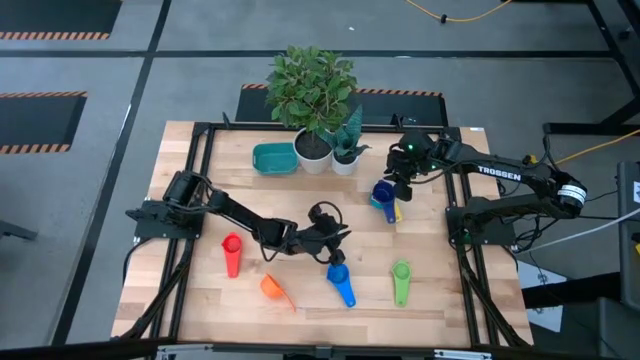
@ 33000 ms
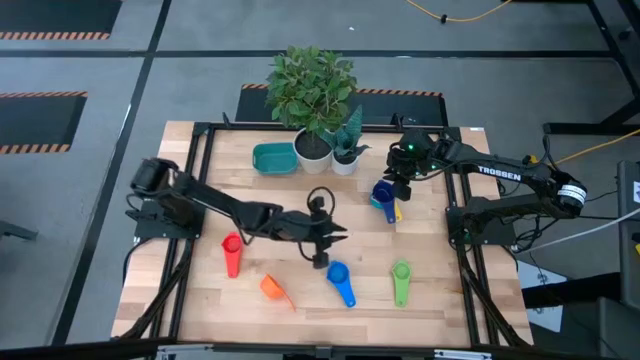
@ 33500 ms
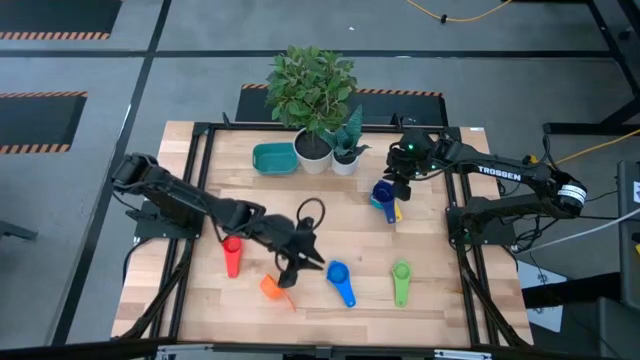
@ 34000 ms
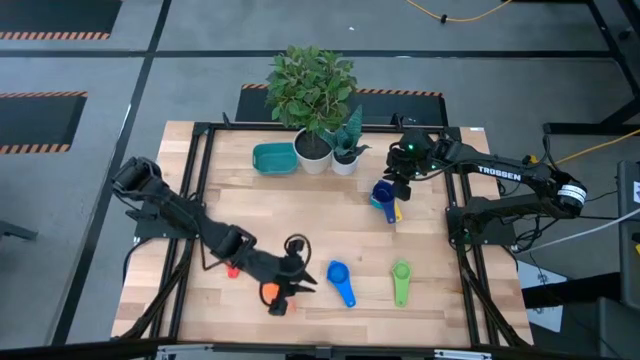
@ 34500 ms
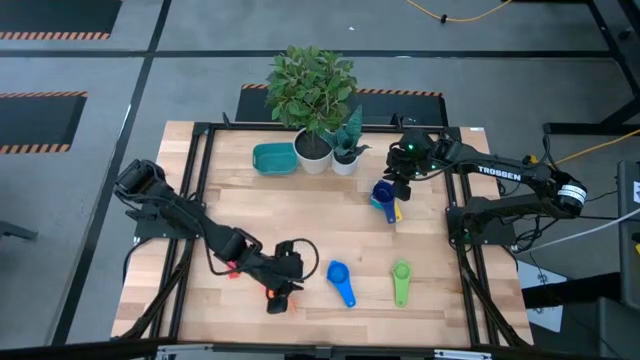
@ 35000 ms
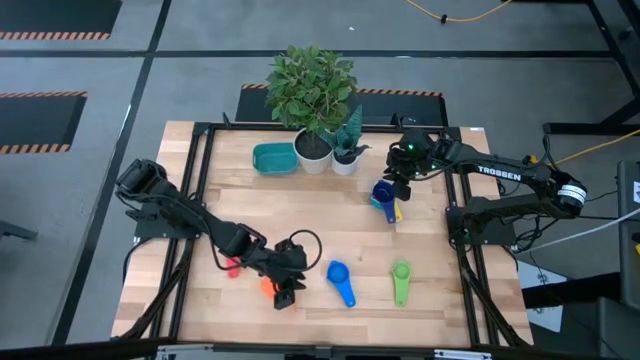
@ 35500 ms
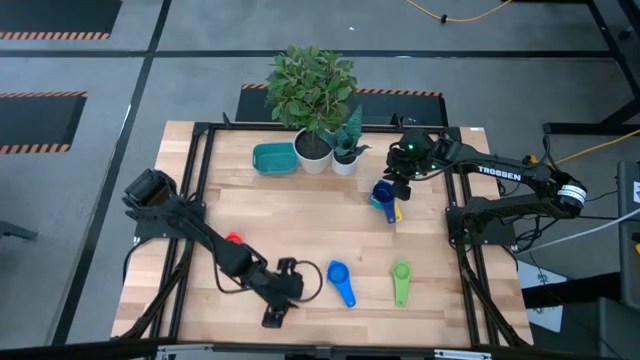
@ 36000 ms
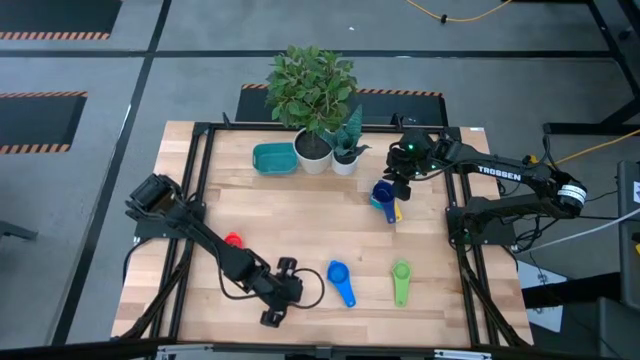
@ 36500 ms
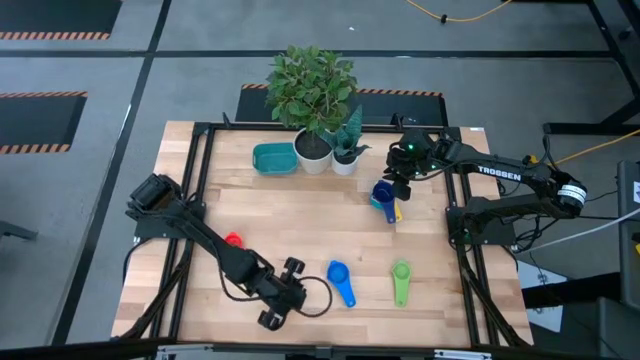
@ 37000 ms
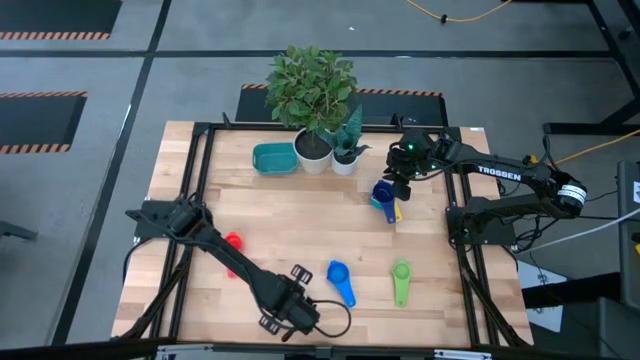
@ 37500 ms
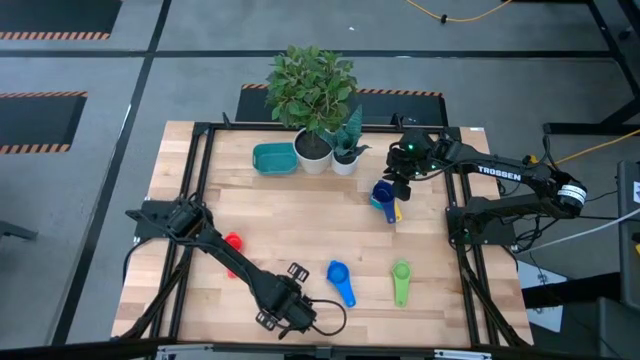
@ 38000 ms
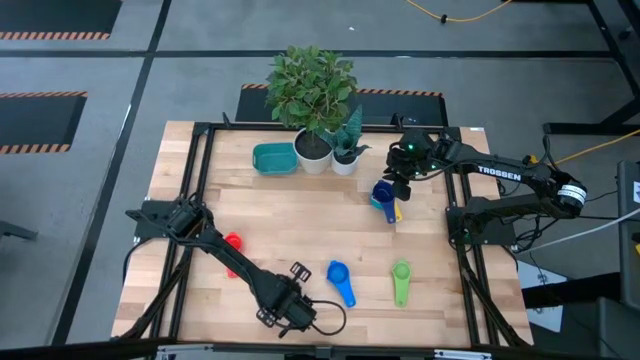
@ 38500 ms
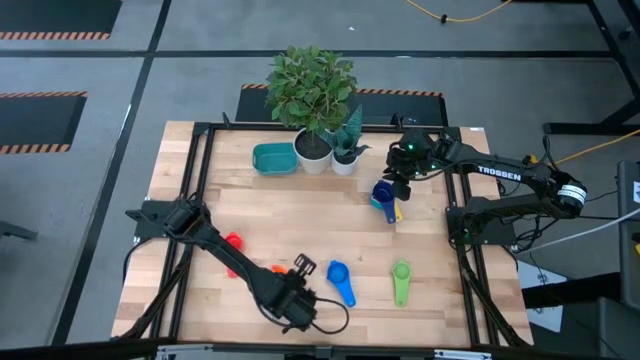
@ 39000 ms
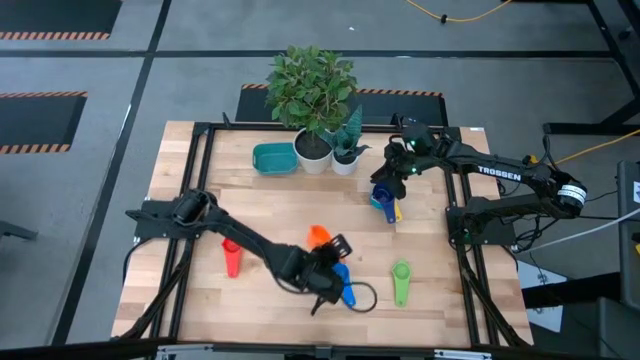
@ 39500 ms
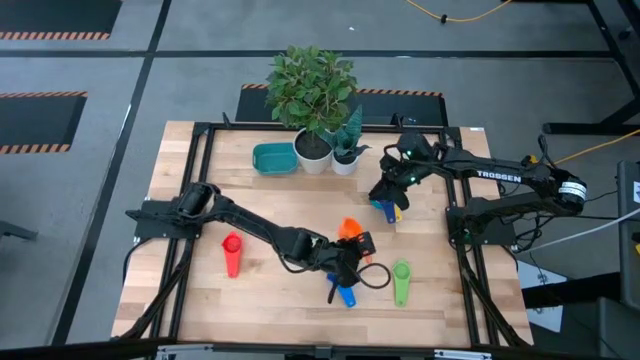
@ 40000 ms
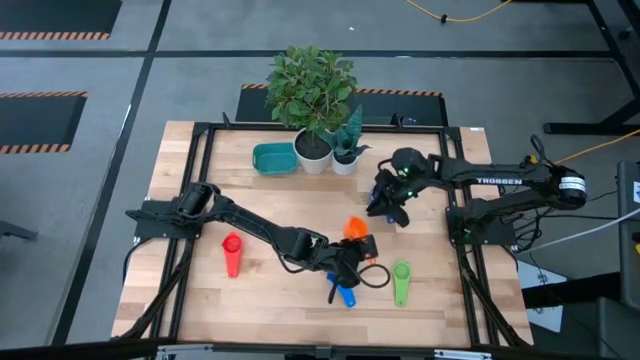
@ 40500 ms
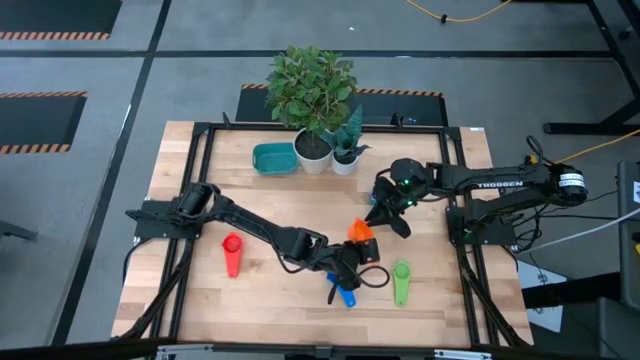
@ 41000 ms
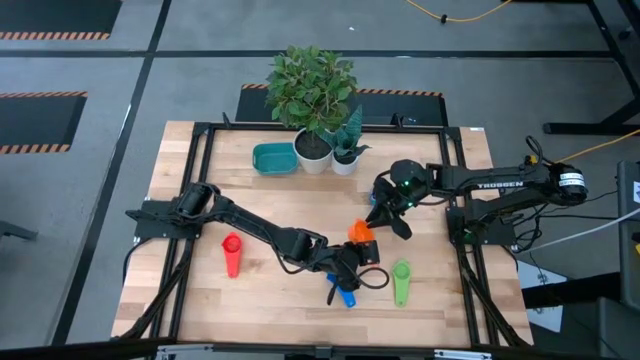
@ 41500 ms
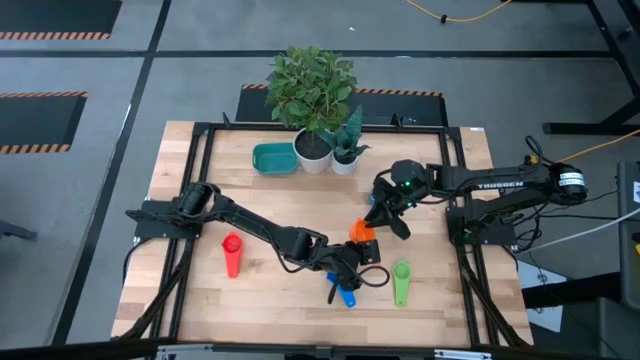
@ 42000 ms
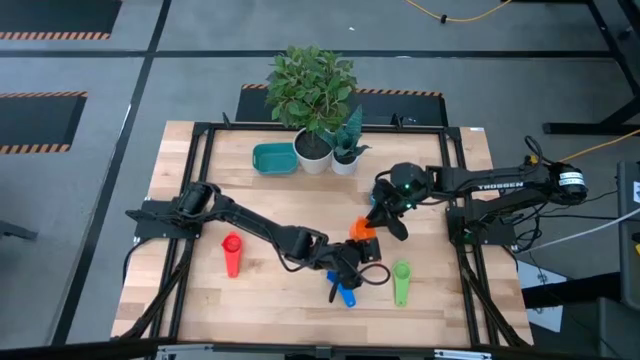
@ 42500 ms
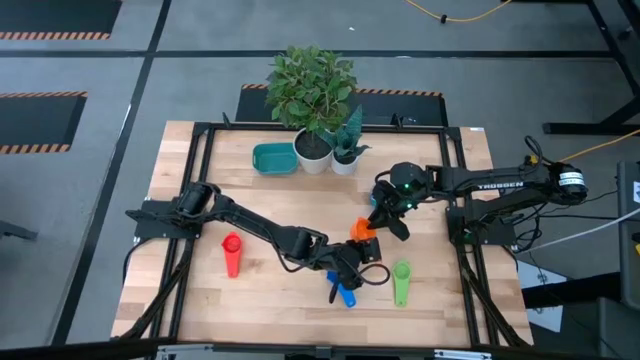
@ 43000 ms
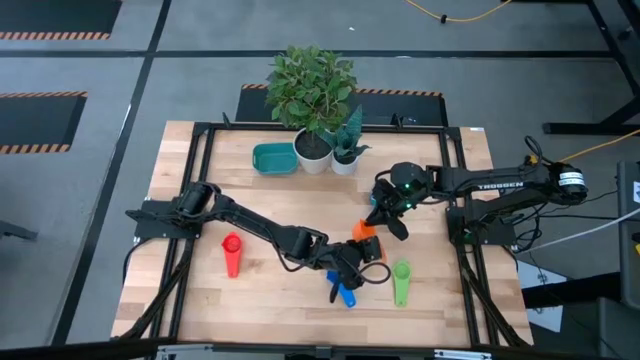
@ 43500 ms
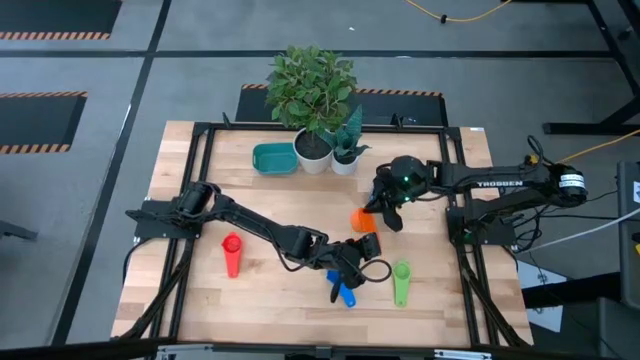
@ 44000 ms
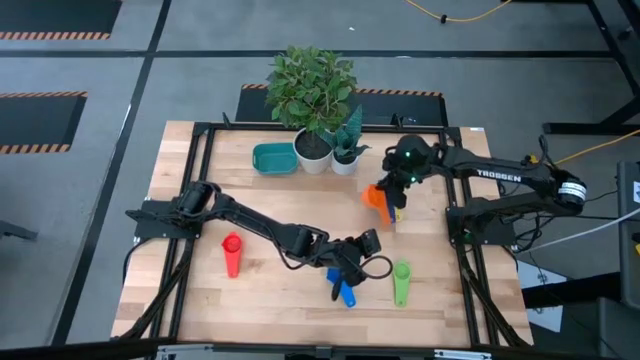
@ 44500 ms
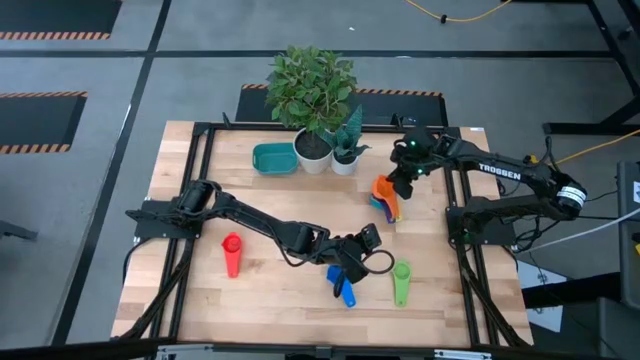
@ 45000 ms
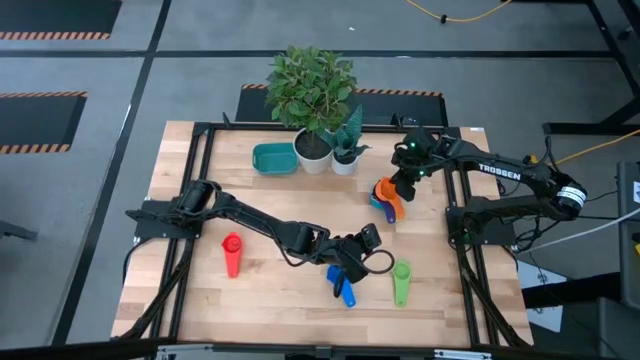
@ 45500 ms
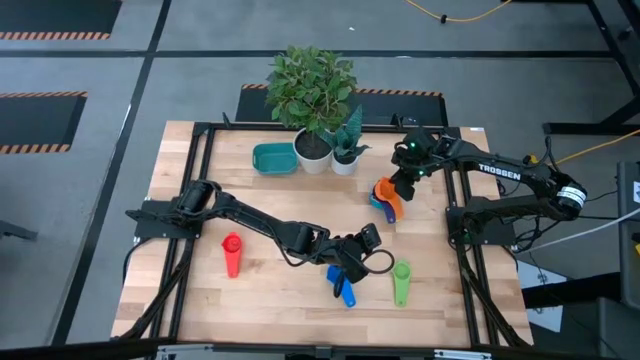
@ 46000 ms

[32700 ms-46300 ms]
Task: Nest measuring cups in basket
Stack the orange measuring cup on top of the blue measuring cup

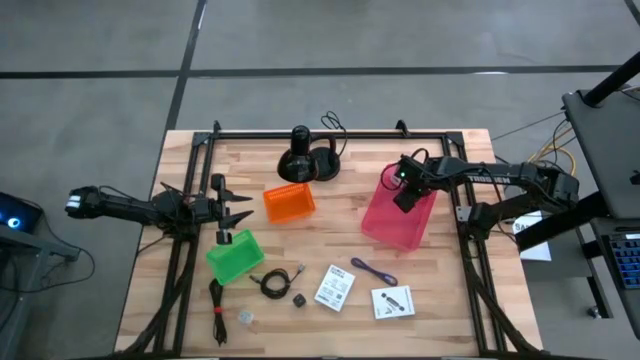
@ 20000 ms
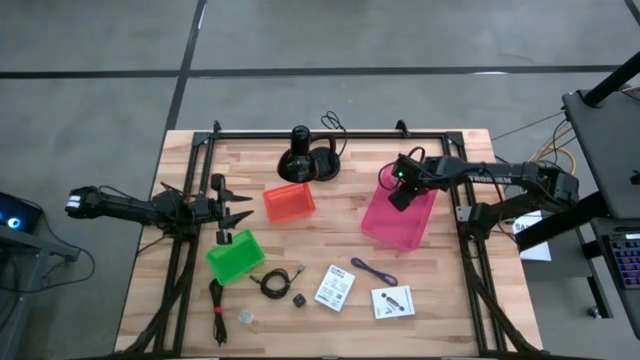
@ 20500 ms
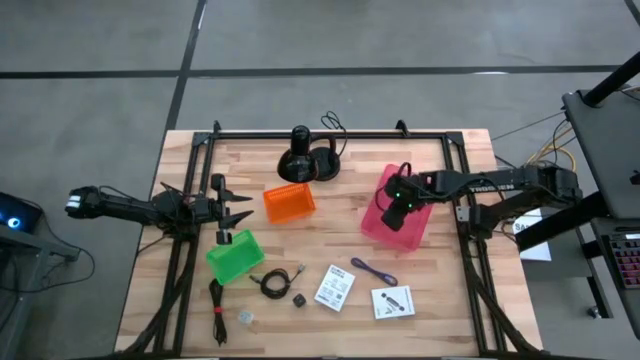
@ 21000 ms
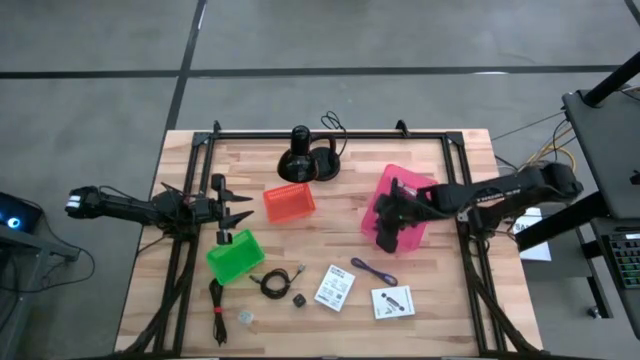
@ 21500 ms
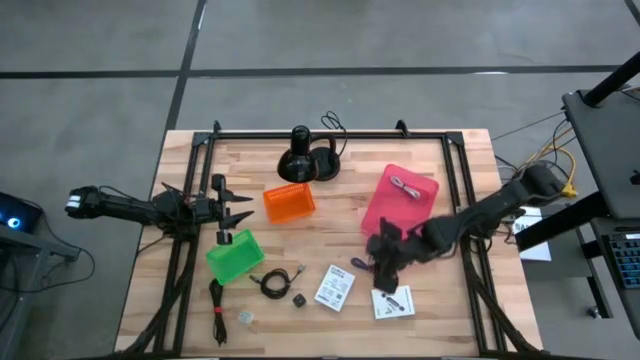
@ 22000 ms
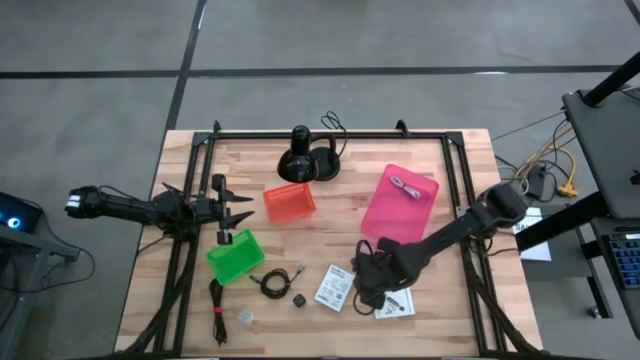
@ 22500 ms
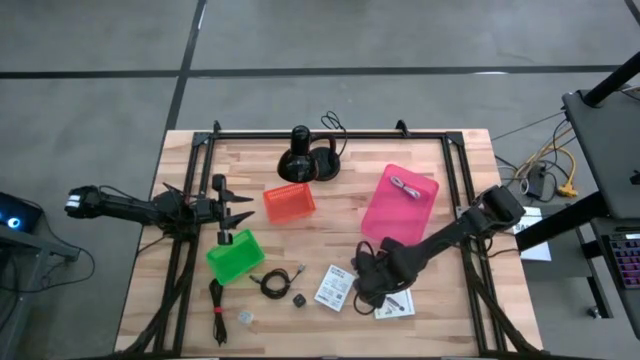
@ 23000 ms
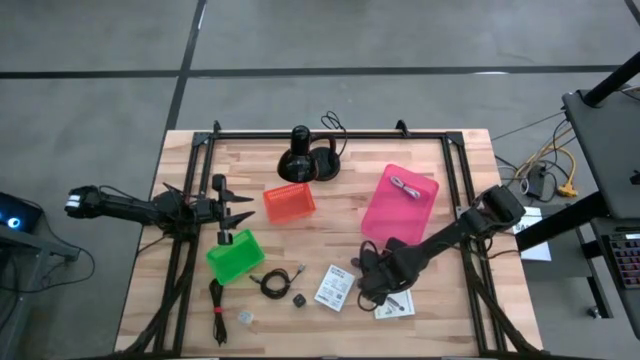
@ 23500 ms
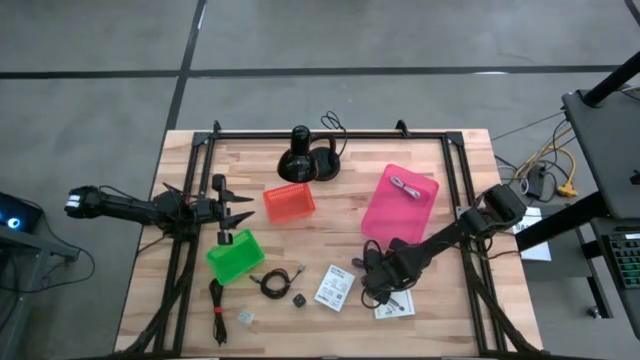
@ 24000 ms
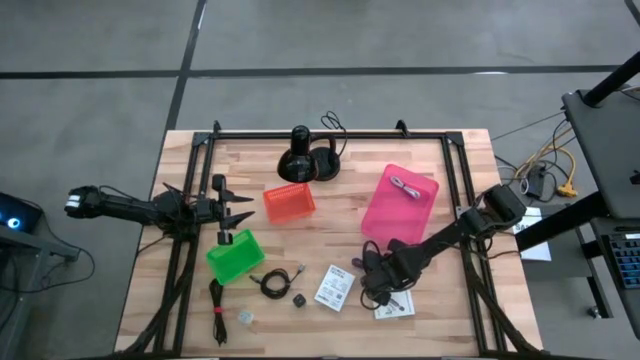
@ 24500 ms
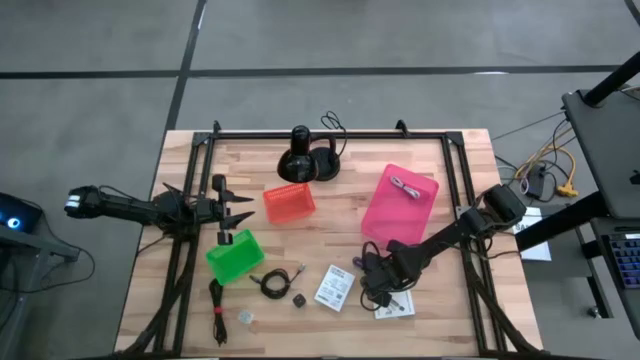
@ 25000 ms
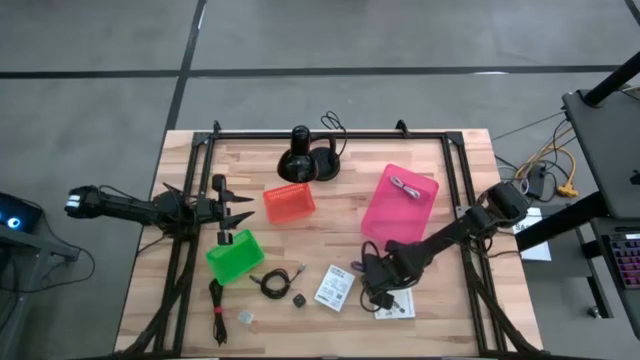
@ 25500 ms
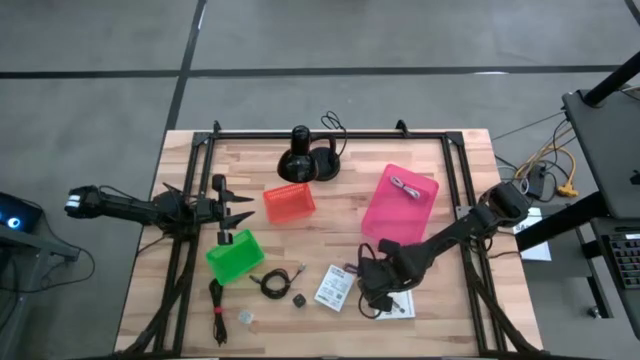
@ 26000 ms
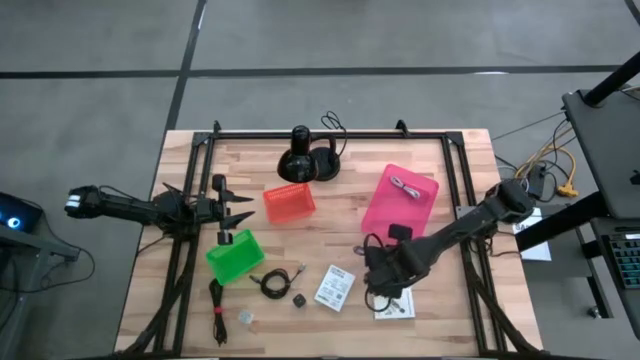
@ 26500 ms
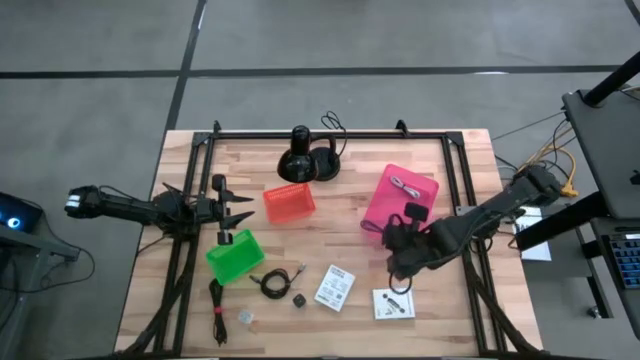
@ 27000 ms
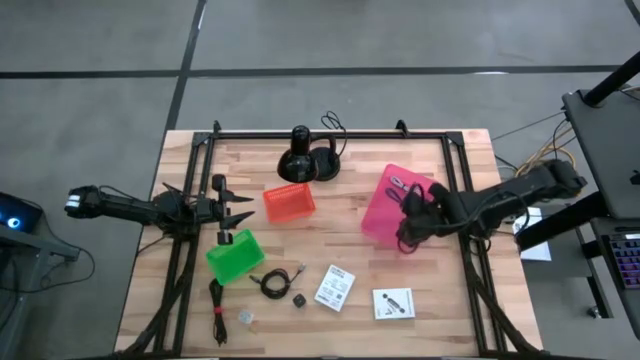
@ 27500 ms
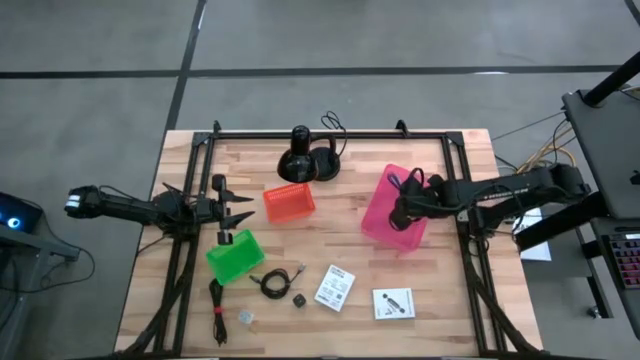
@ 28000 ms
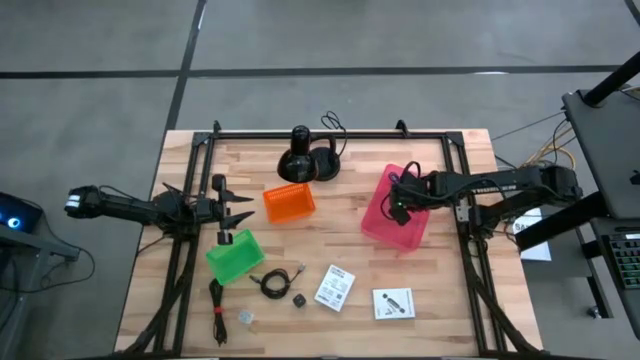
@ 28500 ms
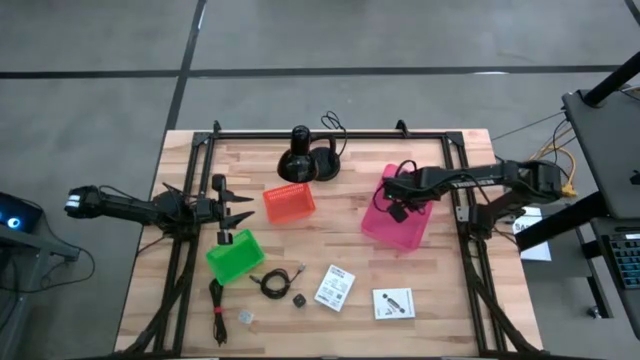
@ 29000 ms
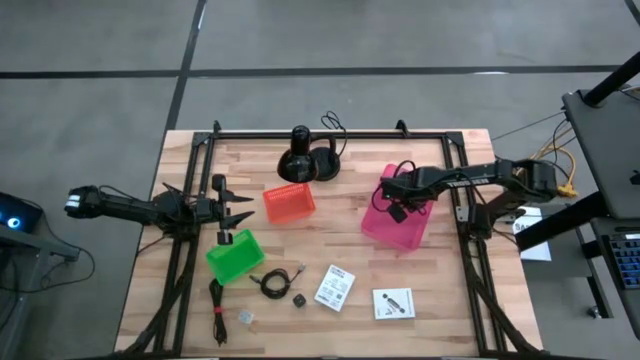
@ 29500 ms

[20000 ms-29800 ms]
Task: Pick and place items into bin
Put the blue charger cable into the pink bin
